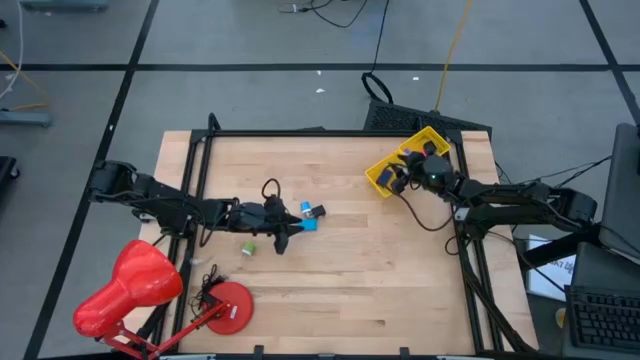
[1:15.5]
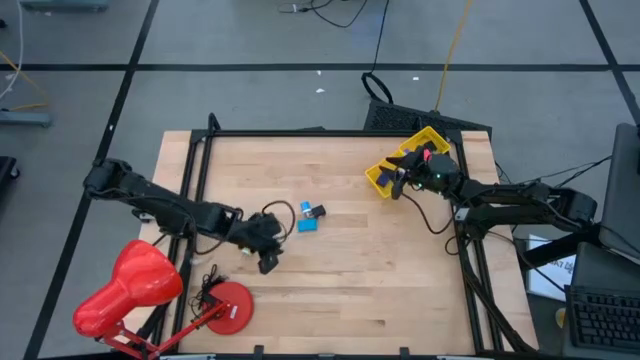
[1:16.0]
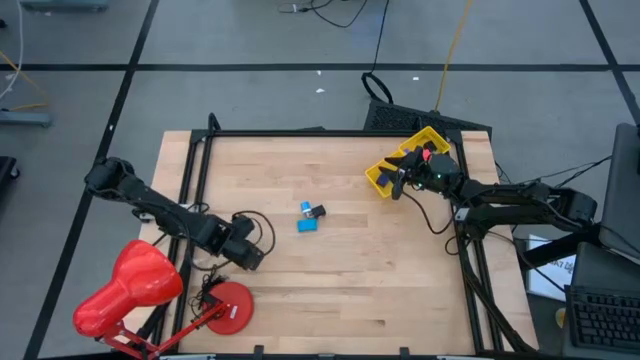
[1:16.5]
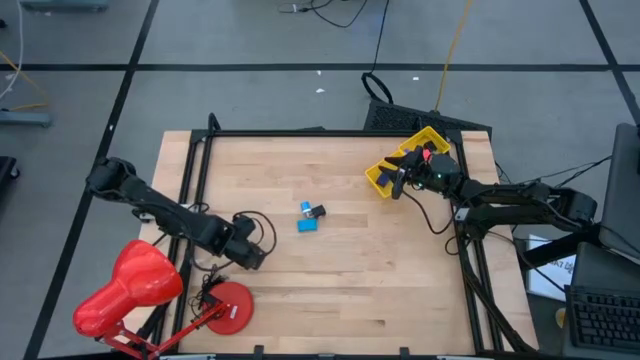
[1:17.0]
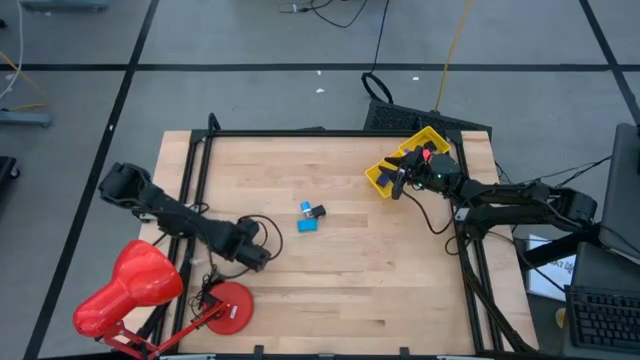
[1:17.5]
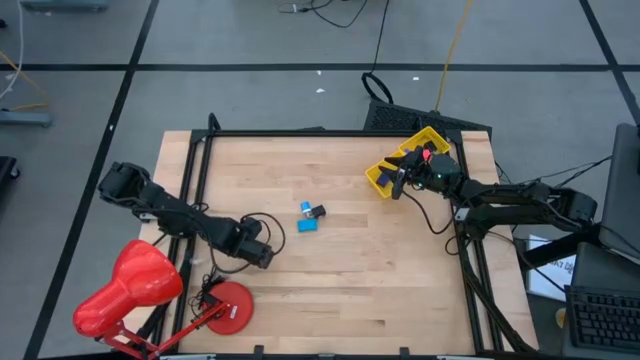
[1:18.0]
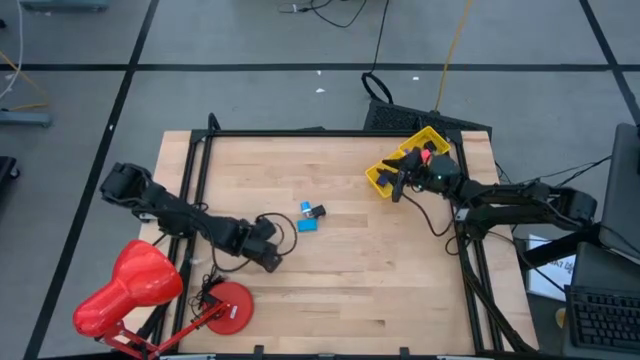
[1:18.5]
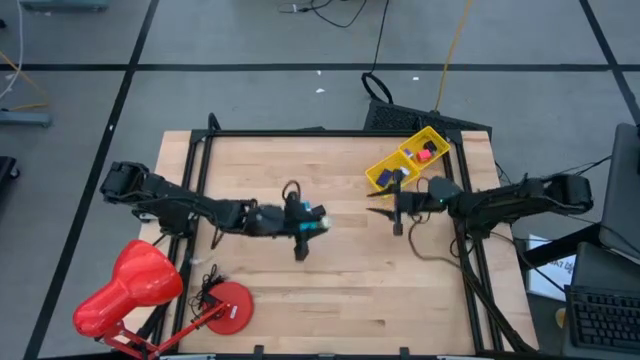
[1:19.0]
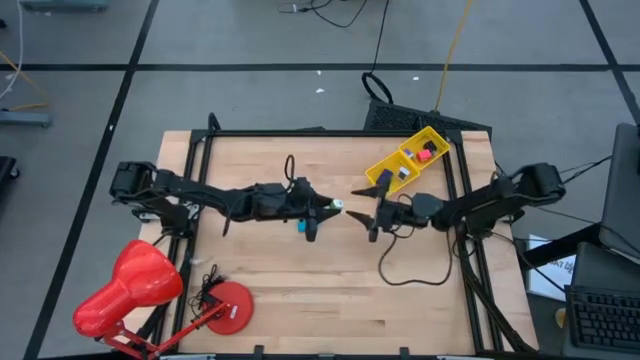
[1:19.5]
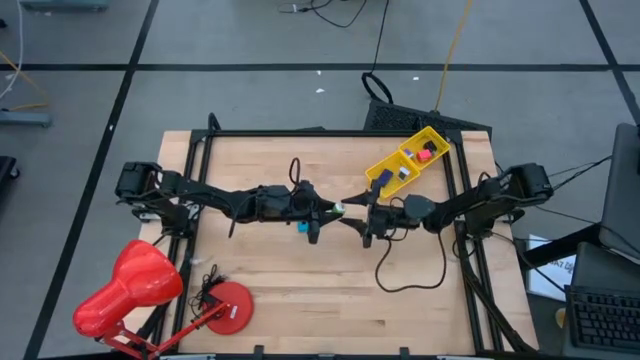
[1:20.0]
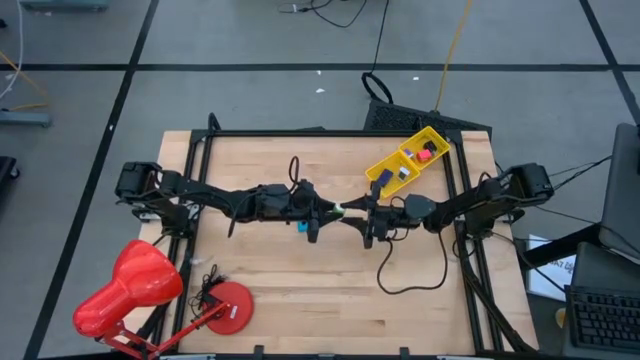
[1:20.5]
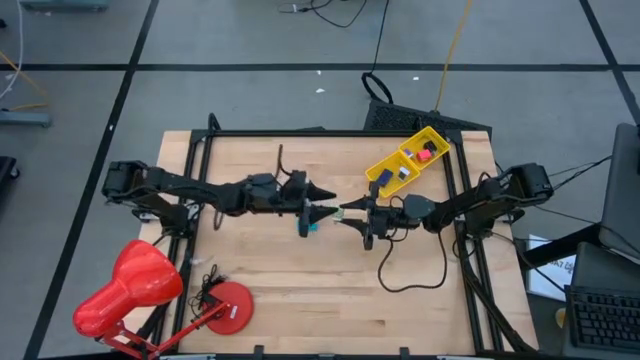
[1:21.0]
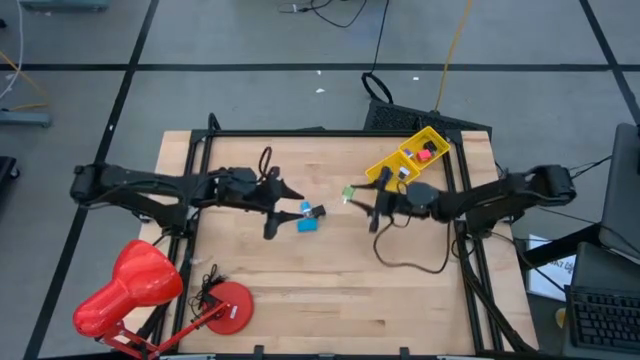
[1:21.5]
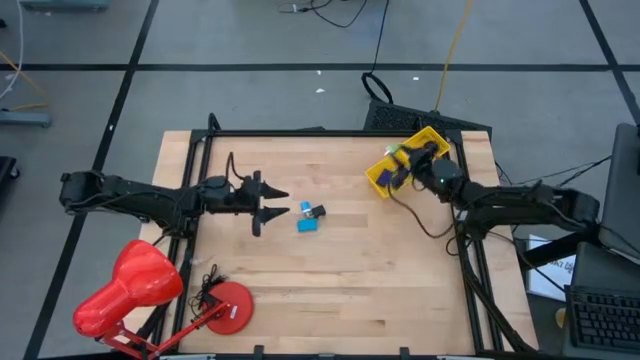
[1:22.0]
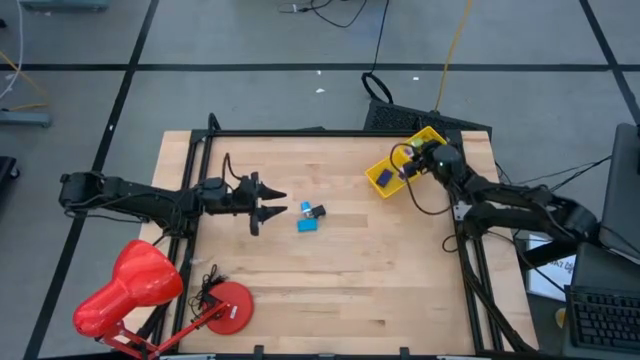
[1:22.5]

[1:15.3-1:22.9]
Task: Pick & Place Office items
Put the green charger adapter into the top yellow basket

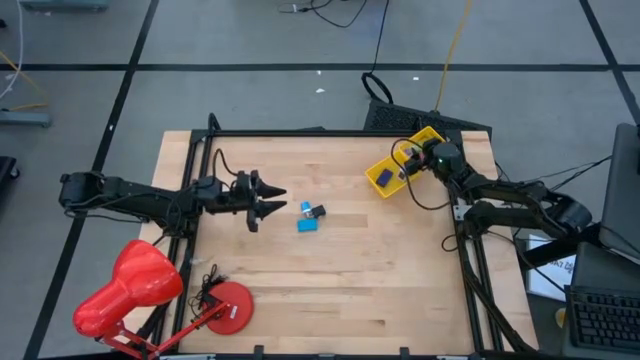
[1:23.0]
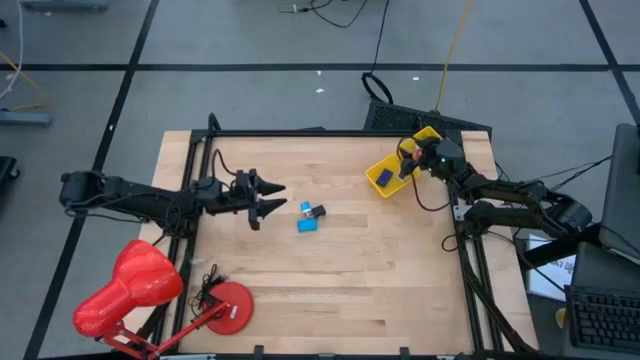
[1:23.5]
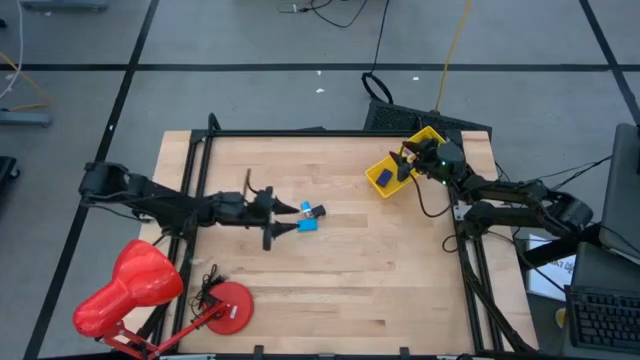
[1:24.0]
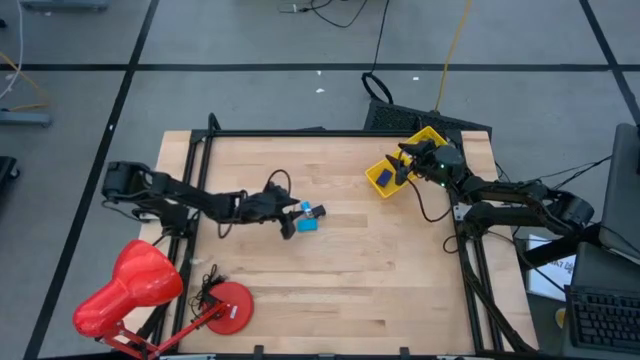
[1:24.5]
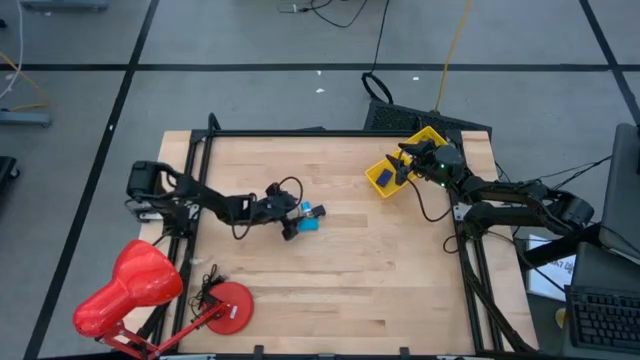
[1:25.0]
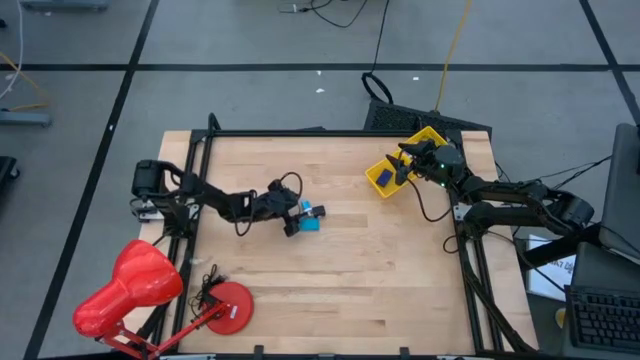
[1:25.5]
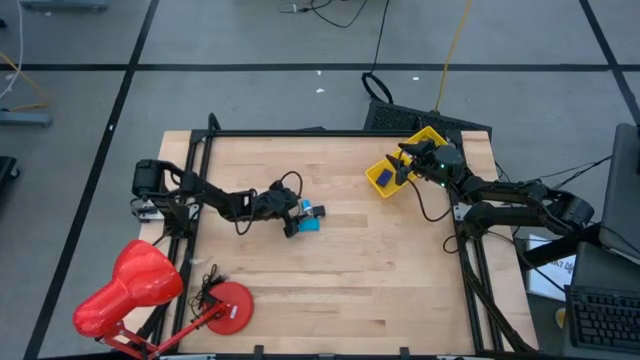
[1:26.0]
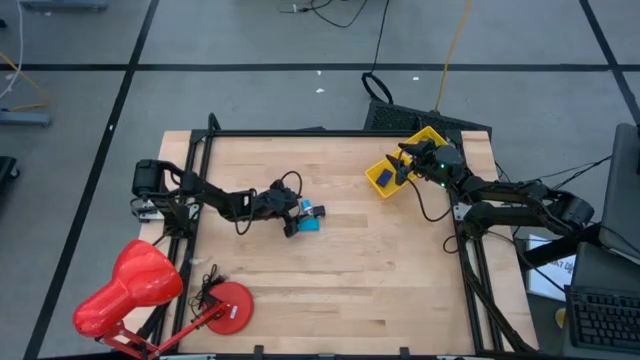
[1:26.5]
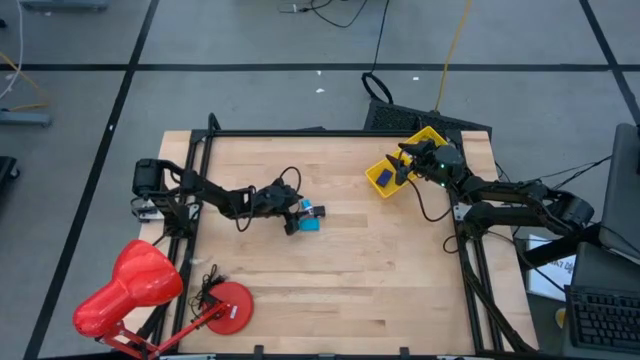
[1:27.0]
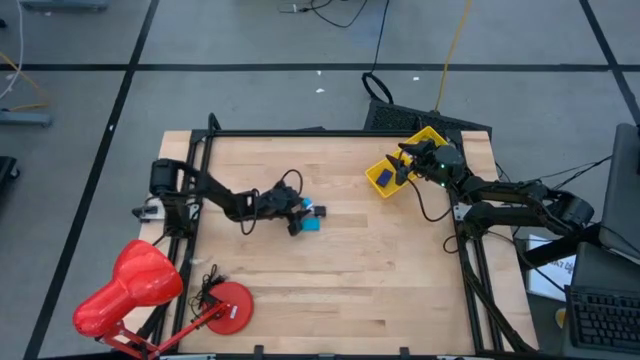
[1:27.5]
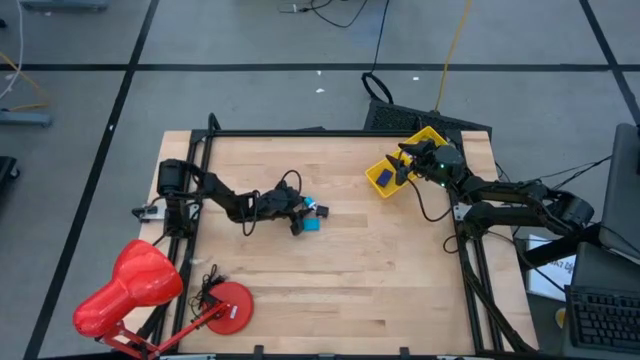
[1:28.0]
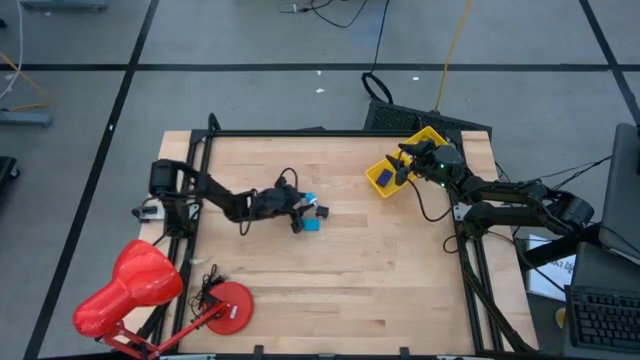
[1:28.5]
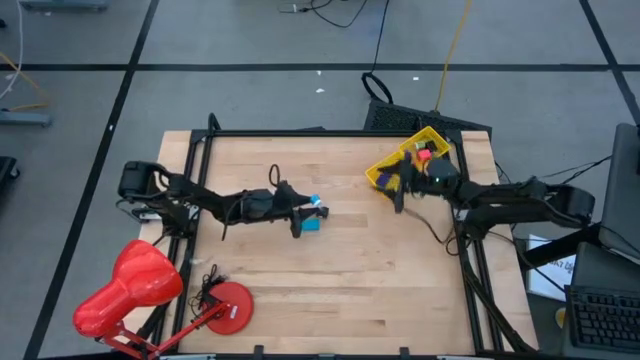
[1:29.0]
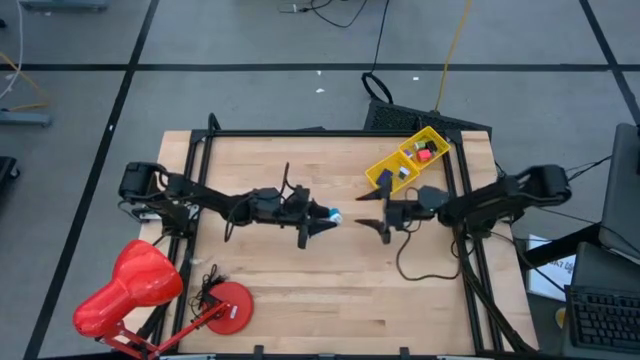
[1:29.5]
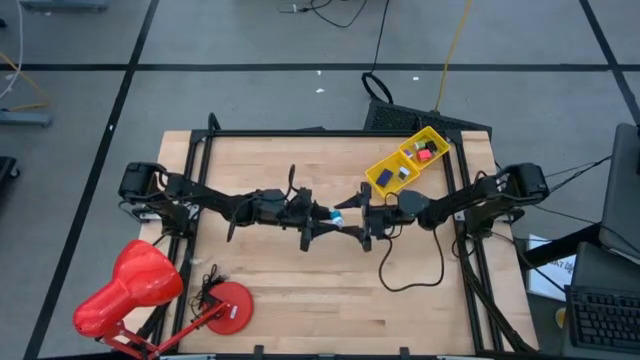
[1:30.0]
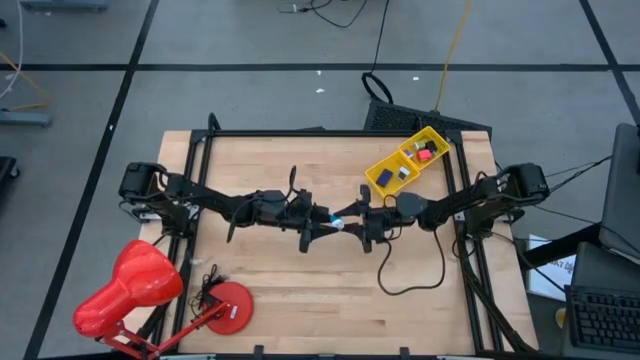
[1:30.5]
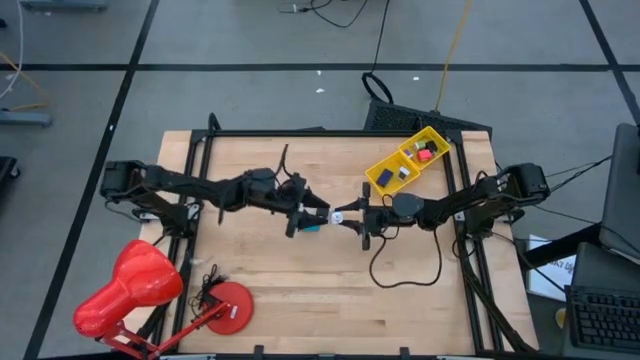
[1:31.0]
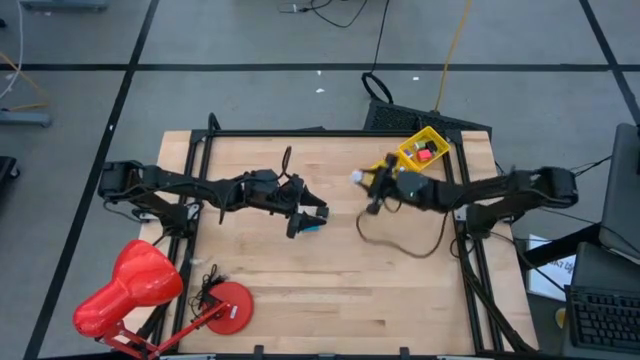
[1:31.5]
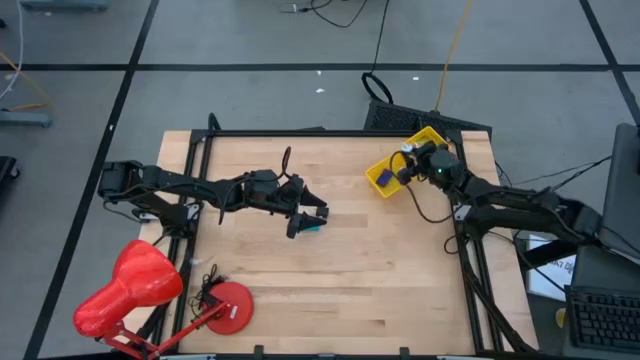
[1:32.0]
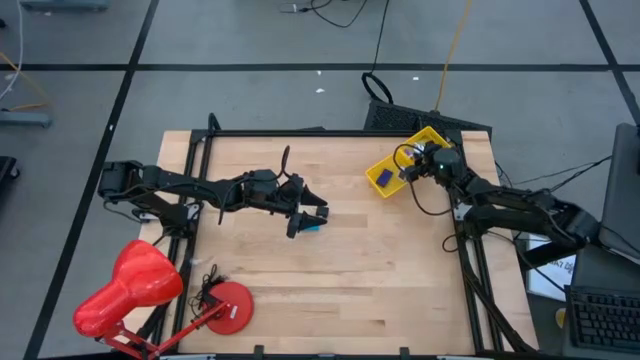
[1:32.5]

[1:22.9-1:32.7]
Put the blue charger adapter into the top yellow basket

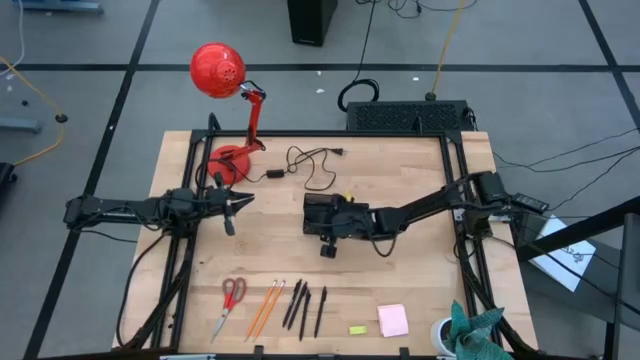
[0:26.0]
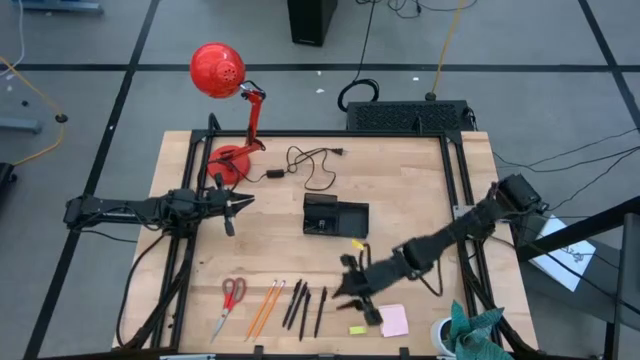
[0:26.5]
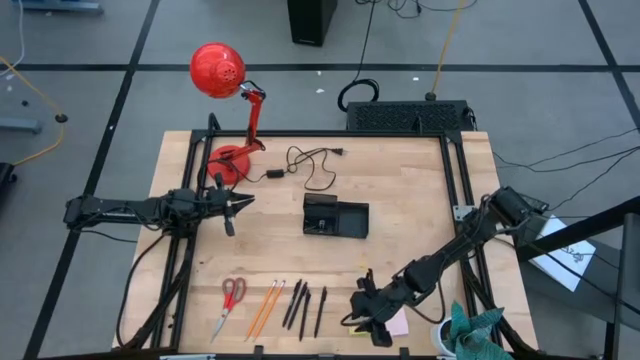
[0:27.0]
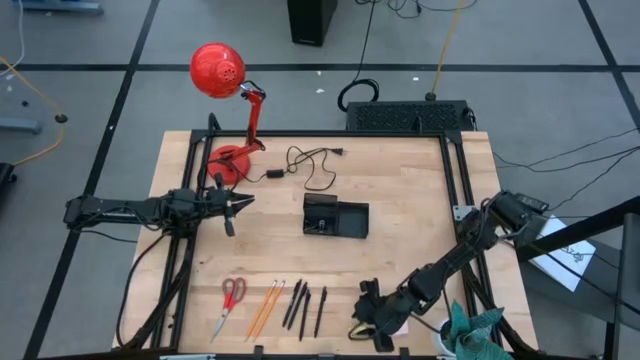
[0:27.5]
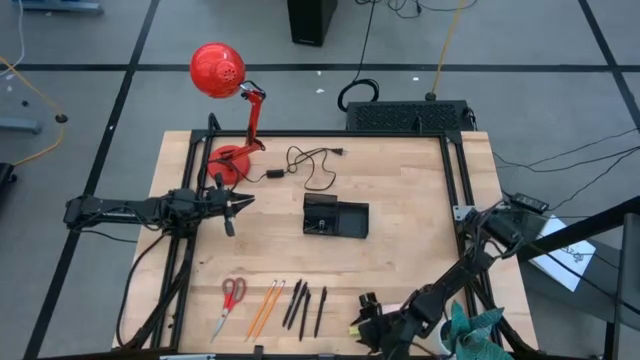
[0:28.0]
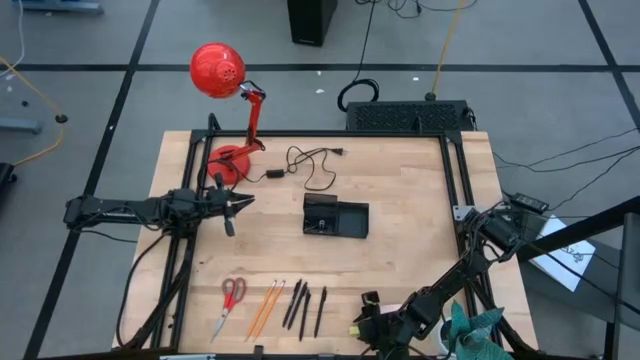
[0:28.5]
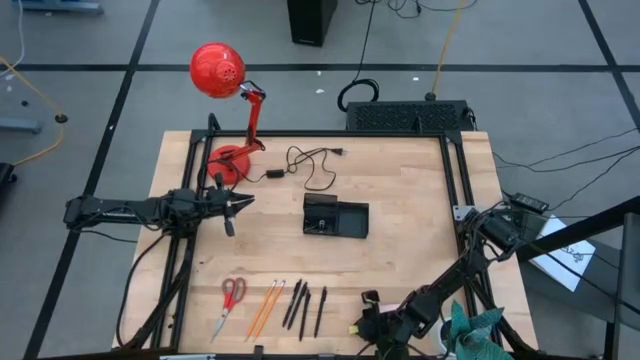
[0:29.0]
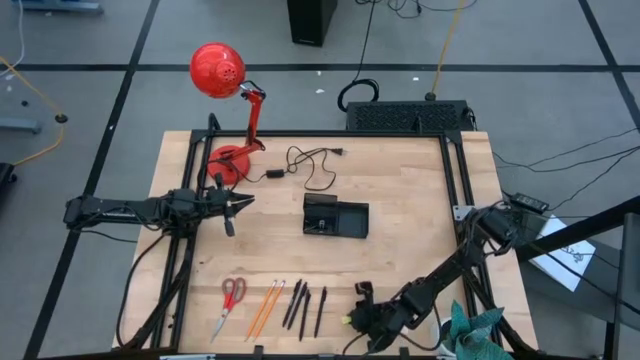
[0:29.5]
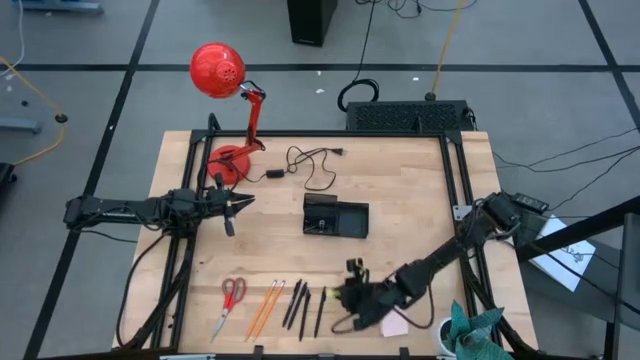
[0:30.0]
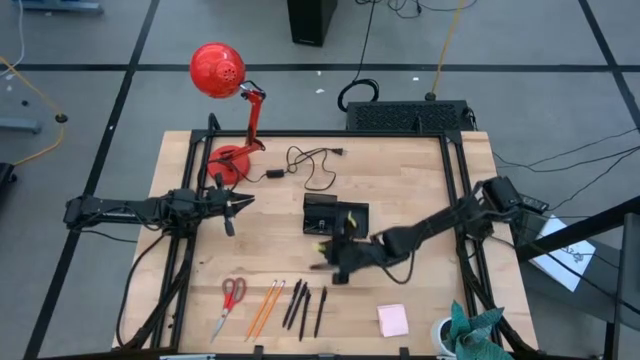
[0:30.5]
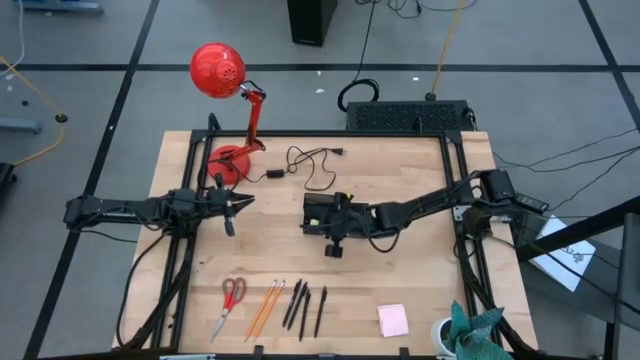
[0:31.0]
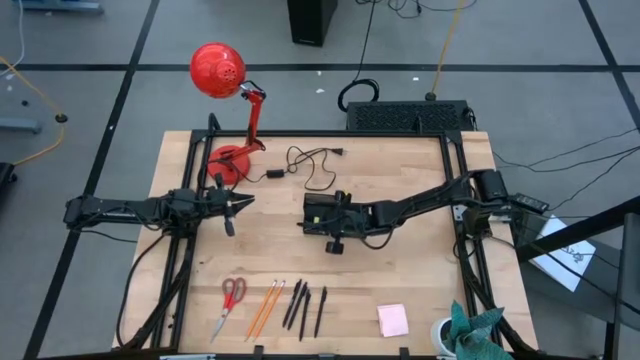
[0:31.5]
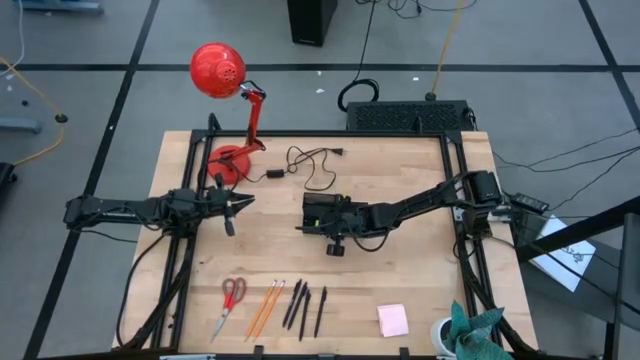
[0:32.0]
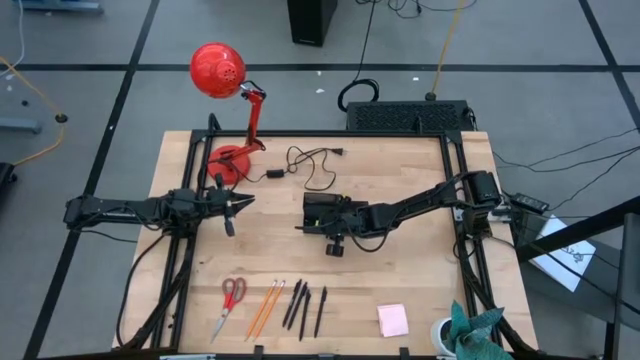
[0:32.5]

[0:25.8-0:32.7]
Task: Pick and place office supplies into organizer
Put the yellow eraser into the black desk organizer
